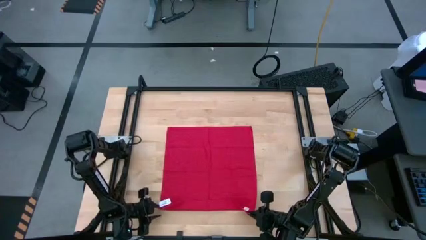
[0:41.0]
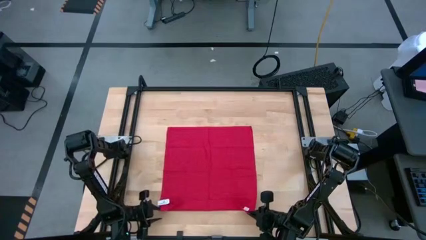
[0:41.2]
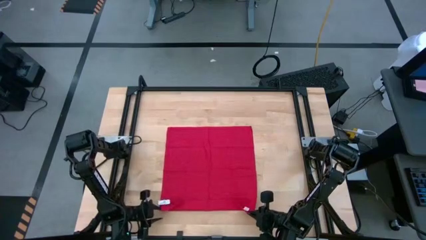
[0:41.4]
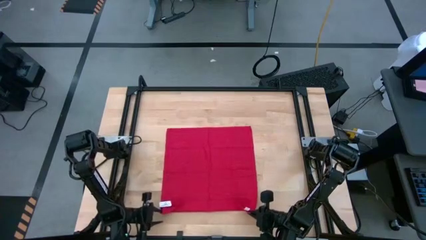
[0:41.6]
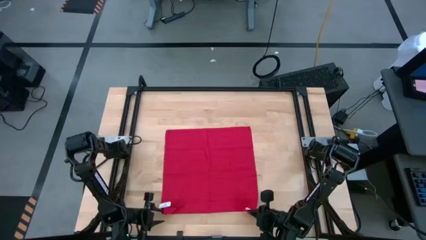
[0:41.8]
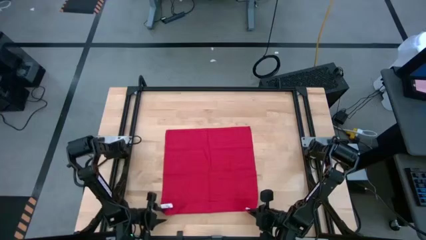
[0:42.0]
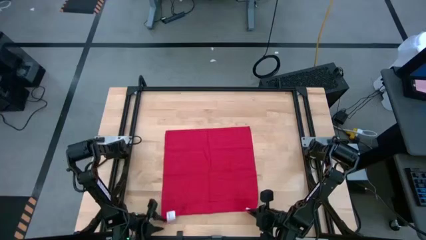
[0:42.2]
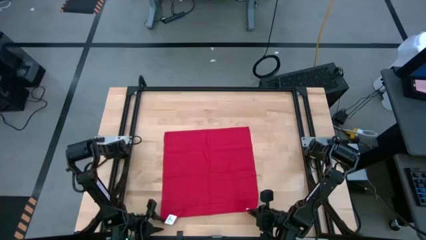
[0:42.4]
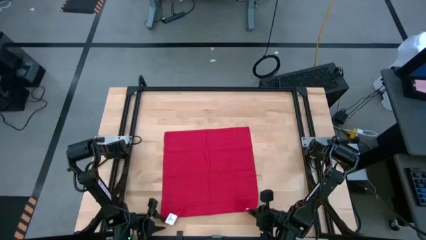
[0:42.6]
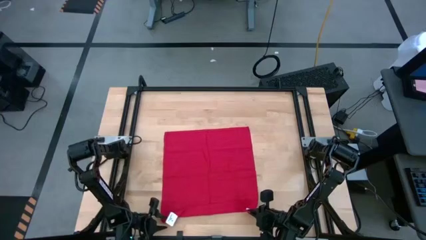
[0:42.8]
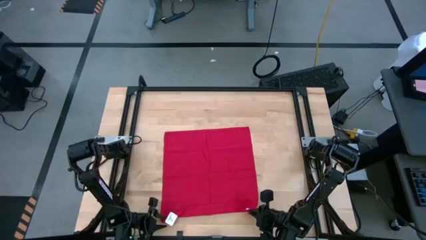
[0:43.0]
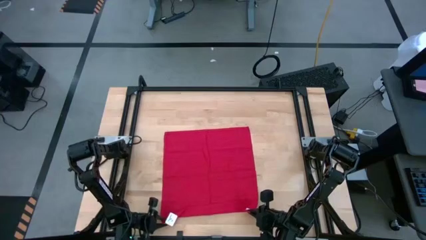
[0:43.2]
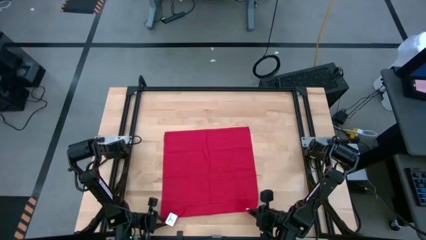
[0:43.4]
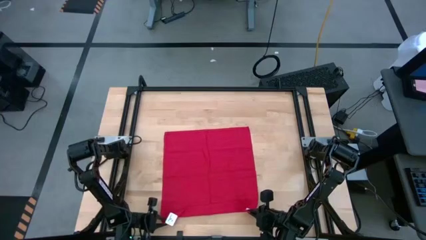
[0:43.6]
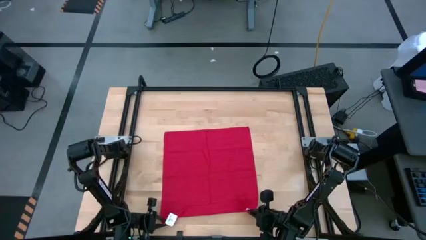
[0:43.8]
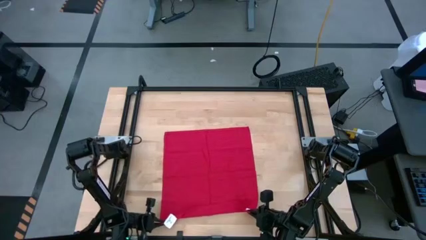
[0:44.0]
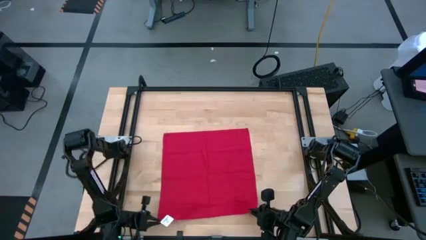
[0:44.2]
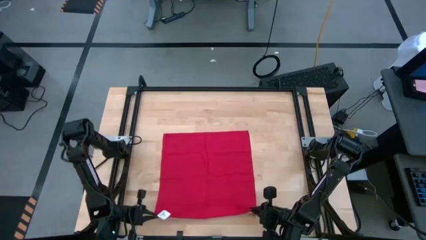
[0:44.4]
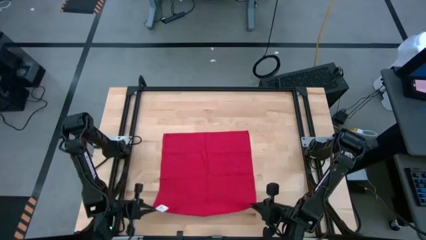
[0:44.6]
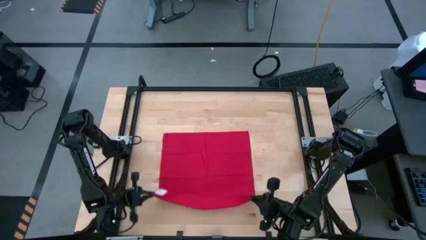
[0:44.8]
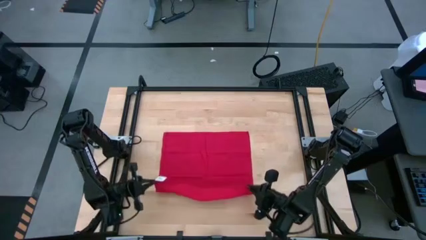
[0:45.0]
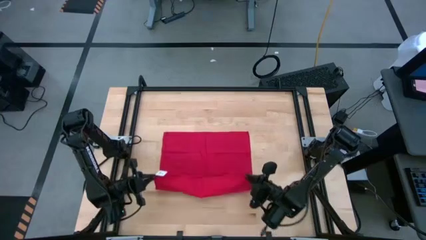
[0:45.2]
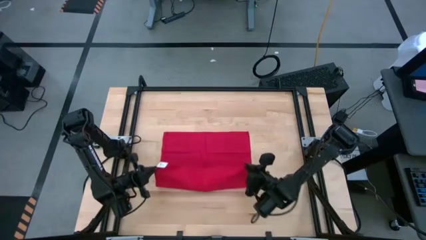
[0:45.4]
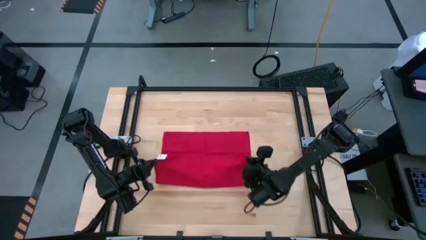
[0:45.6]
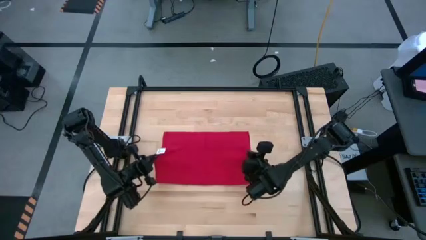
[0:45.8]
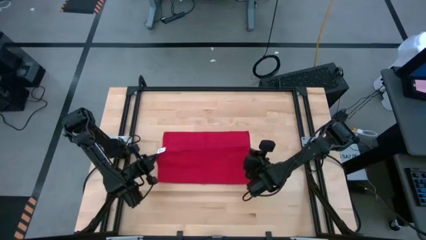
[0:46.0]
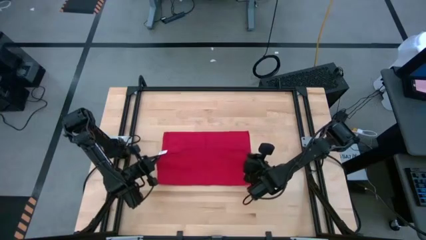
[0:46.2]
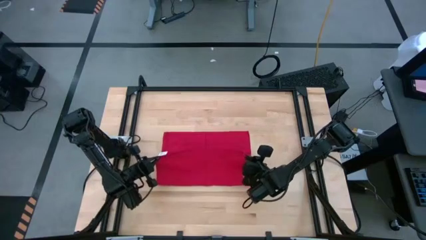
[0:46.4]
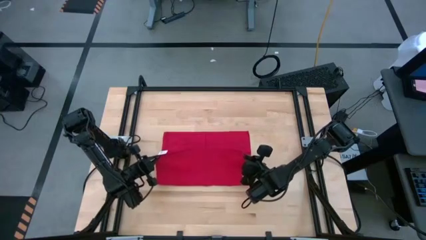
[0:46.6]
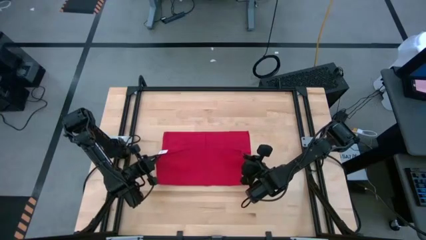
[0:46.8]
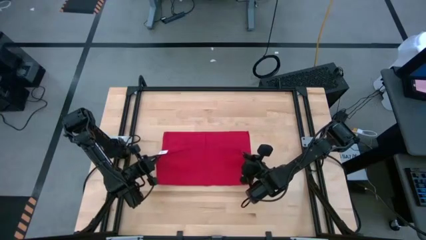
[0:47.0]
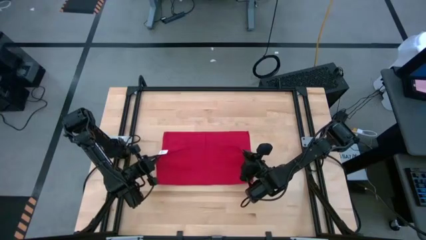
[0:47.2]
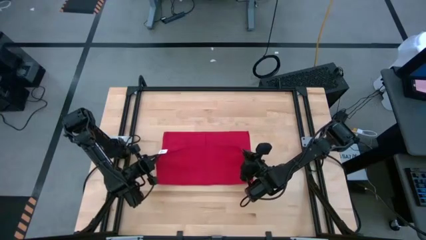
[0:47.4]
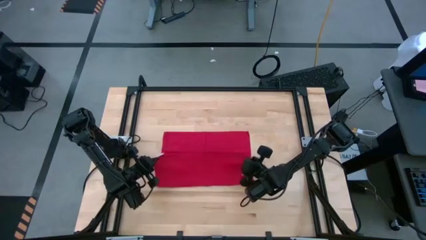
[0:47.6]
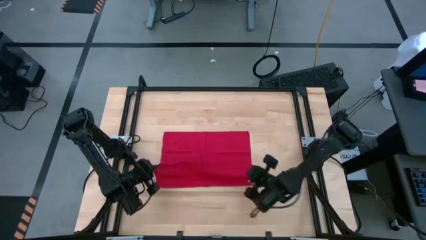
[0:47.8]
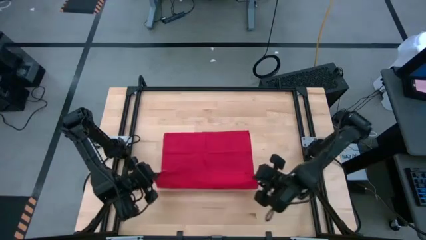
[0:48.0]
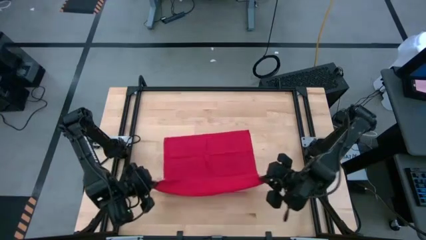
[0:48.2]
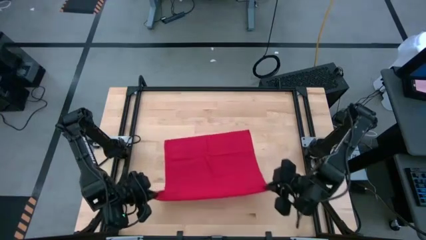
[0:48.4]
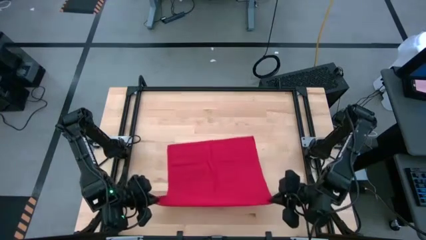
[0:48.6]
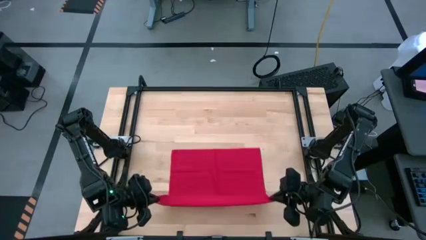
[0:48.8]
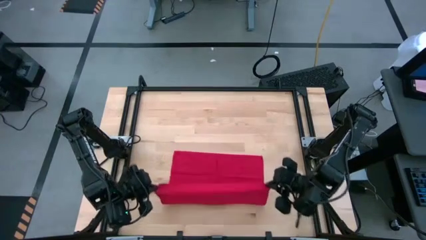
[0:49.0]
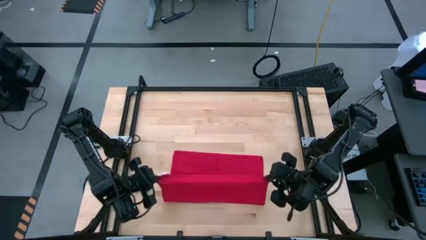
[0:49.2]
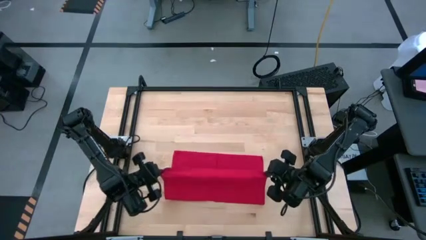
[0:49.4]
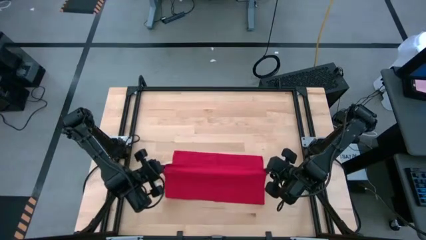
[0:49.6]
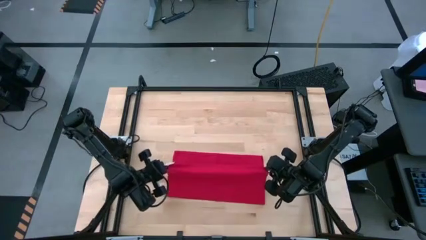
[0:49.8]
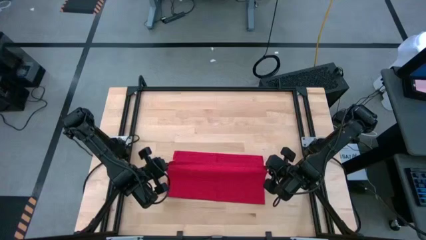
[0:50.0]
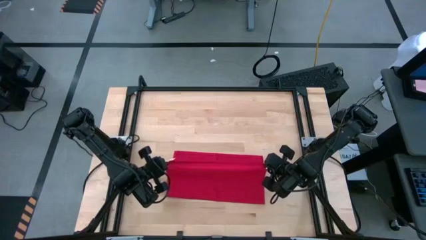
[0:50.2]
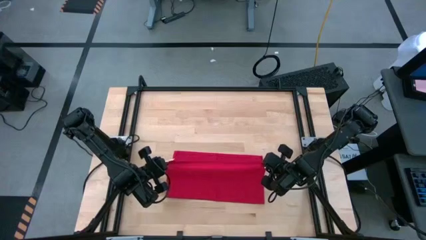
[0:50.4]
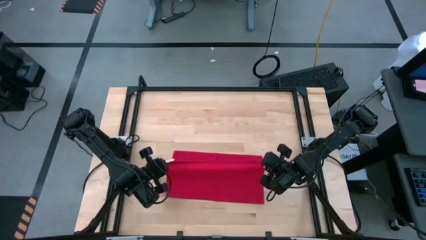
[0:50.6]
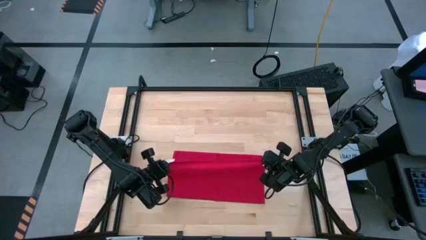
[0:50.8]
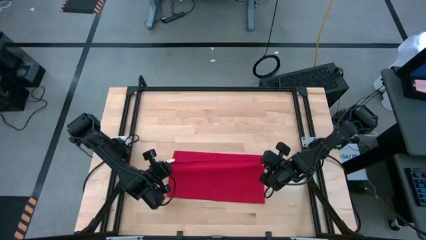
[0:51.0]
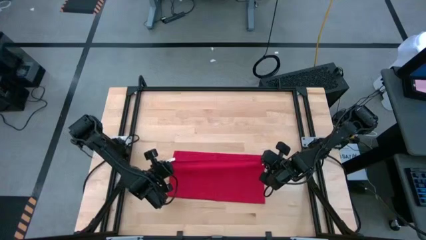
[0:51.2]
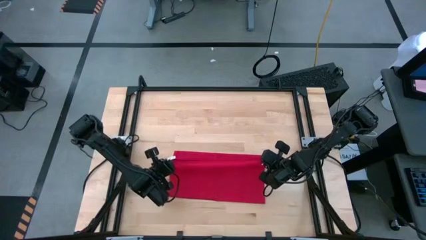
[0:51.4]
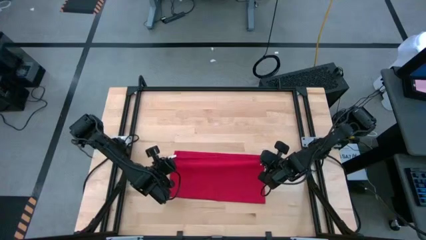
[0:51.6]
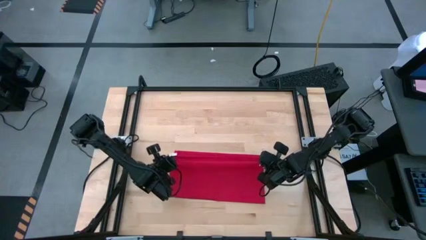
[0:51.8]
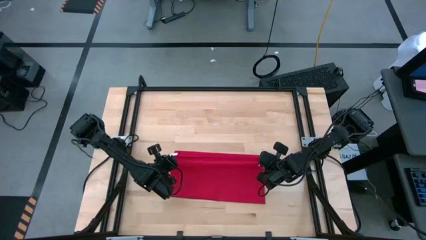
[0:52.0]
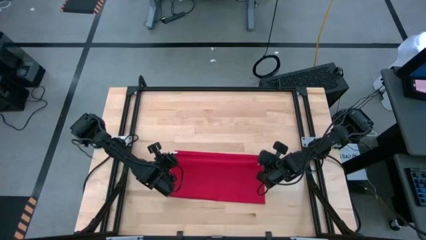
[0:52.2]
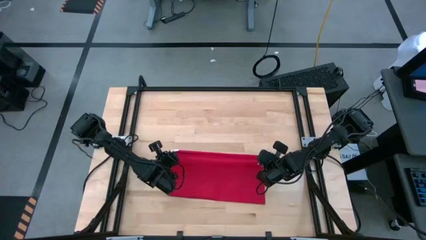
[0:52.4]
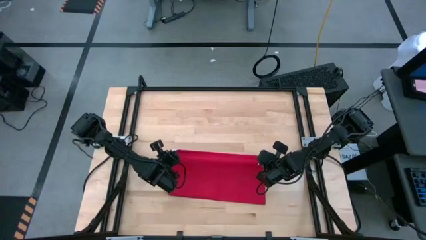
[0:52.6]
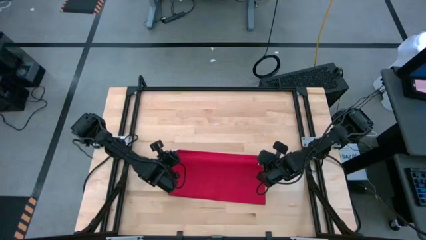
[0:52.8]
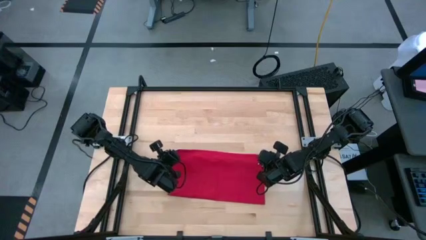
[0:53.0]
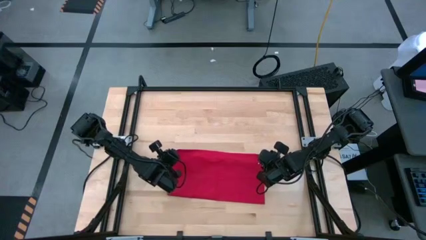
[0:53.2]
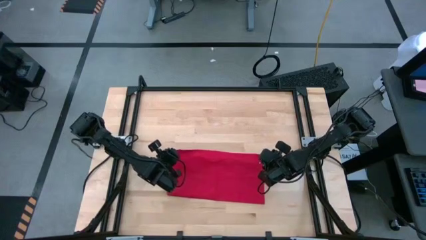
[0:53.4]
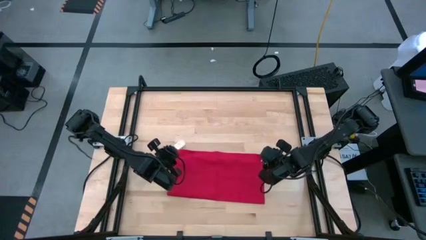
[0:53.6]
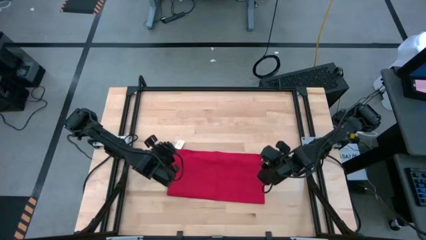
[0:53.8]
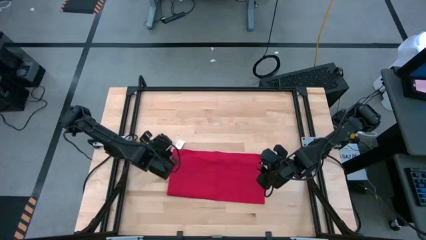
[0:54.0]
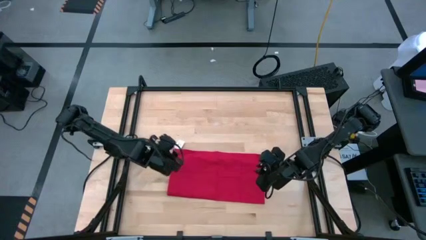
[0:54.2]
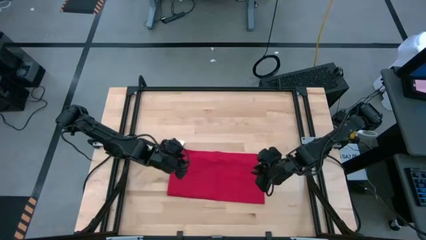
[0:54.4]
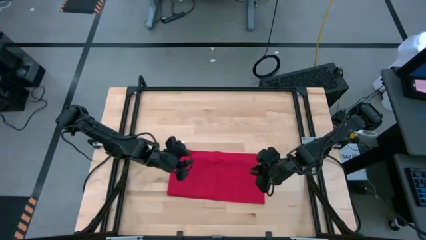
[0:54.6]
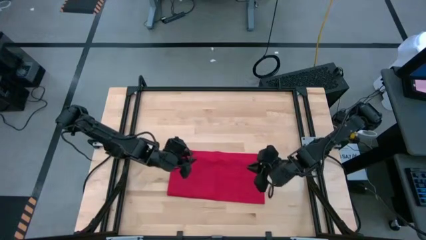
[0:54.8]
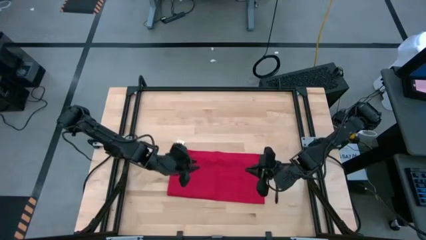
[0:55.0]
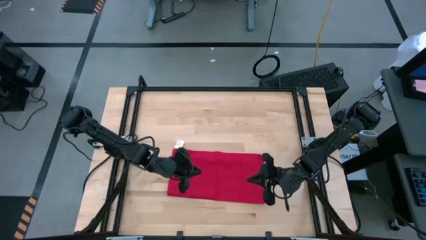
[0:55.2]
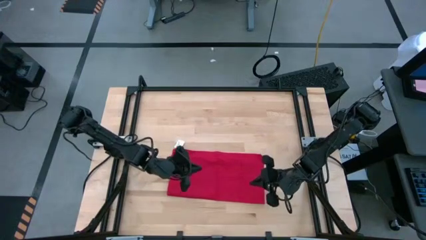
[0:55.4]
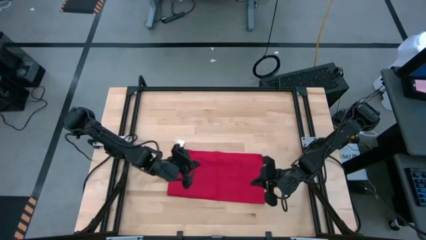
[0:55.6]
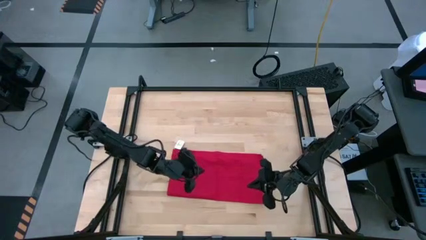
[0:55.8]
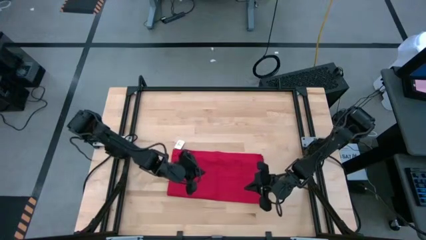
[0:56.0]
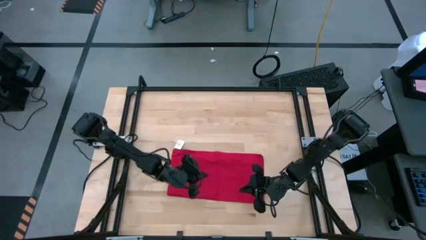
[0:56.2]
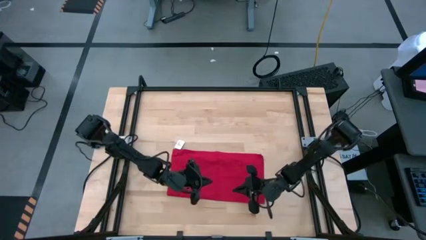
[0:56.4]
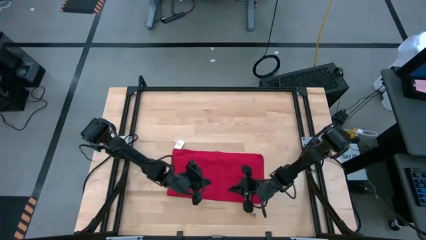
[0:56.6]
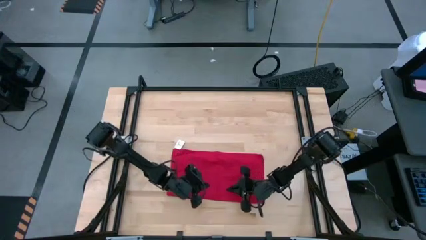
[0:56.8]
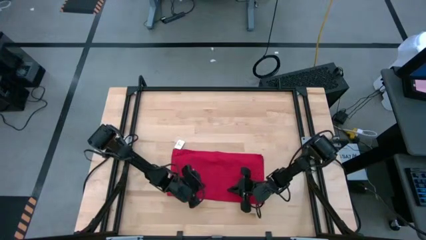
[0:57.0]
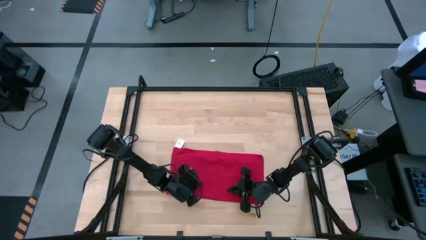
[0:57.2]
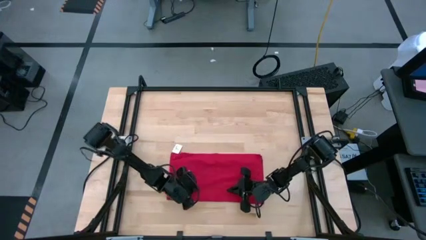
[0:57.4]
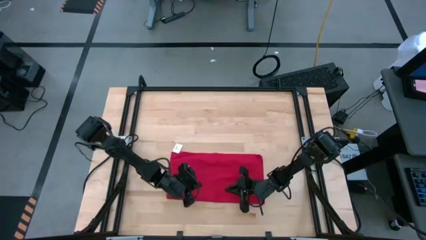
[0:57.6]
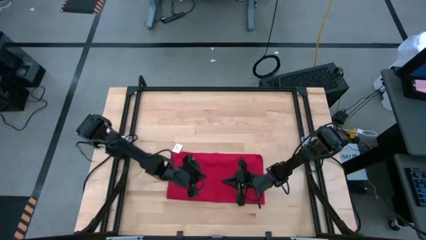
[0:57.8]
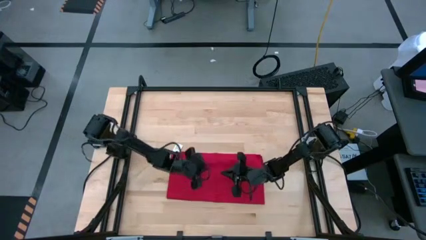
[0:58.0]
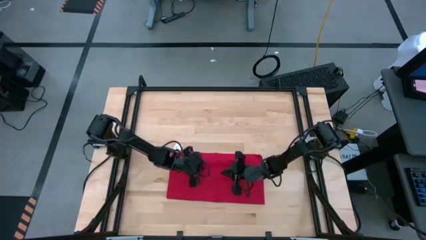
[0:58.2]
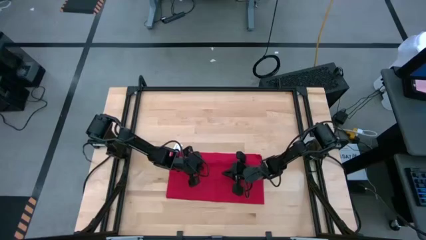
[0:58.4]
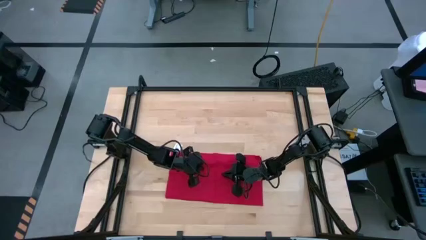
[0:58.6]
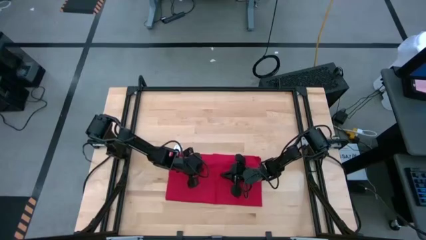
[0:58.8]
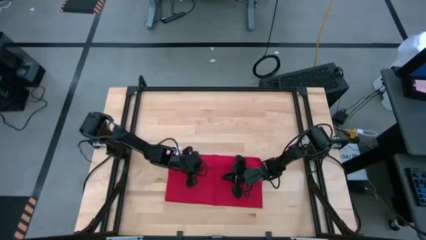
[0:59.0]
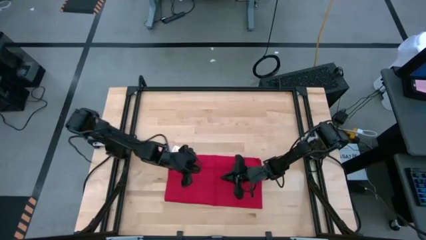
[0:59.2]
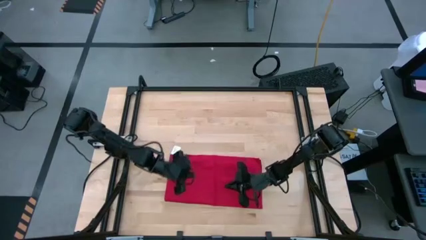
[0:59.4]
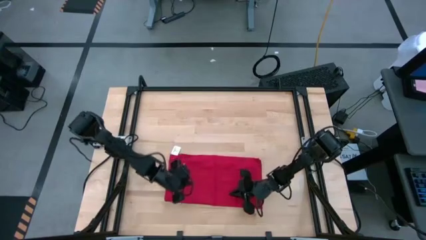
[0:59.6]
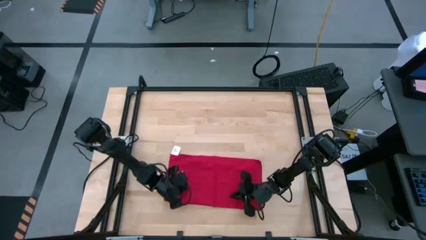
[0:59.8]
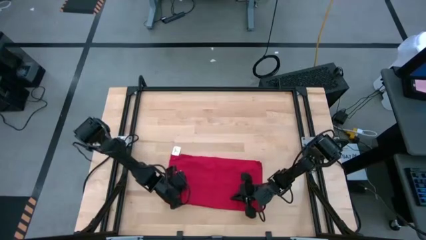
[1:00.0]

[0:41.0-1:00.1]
Task: Roll towel
Roll the red towel
